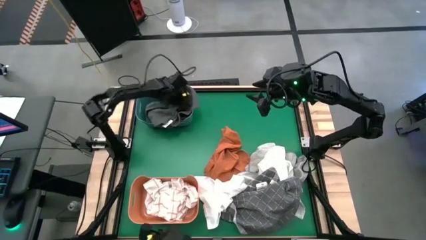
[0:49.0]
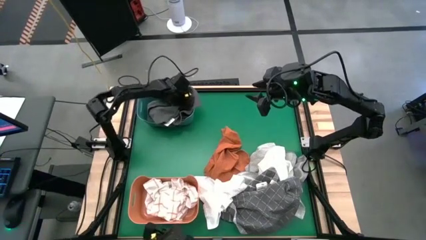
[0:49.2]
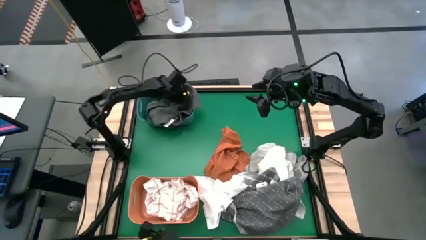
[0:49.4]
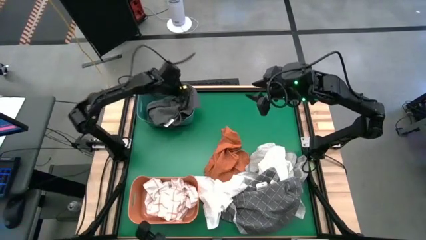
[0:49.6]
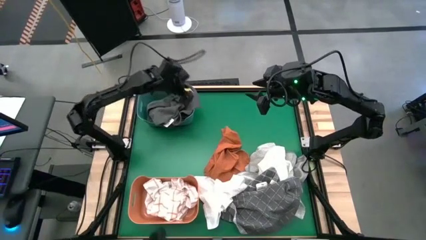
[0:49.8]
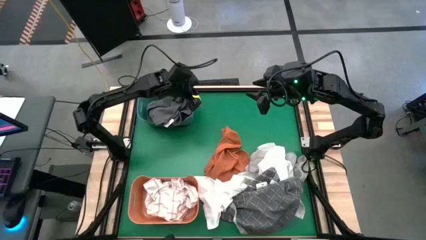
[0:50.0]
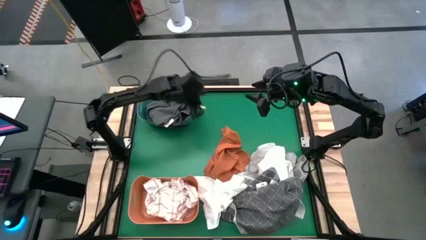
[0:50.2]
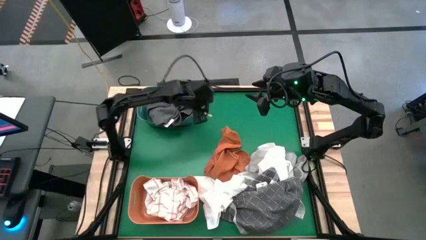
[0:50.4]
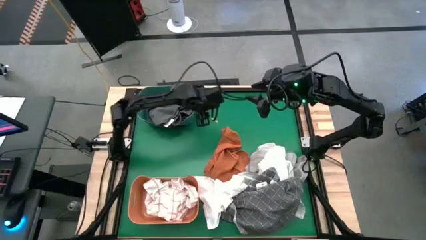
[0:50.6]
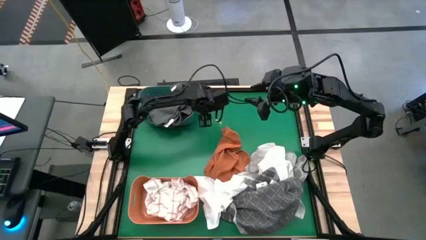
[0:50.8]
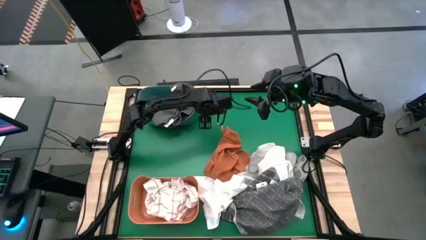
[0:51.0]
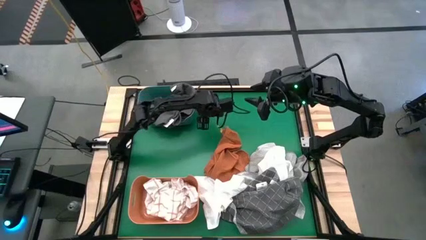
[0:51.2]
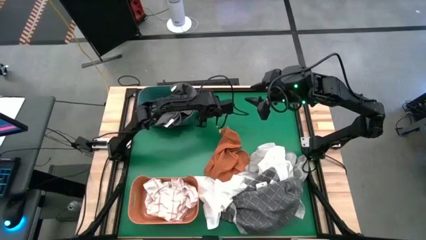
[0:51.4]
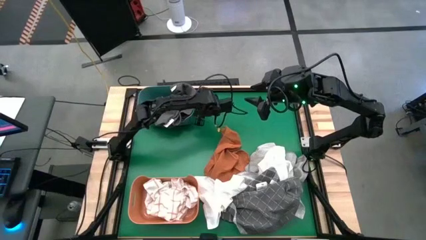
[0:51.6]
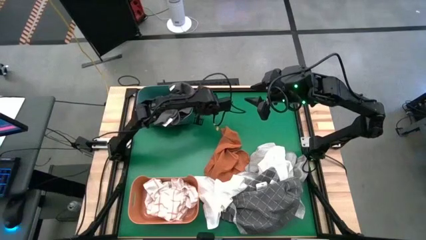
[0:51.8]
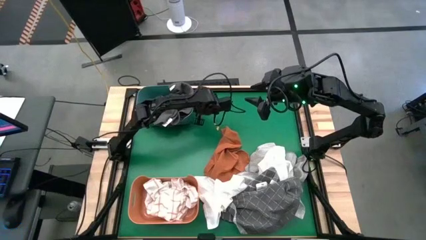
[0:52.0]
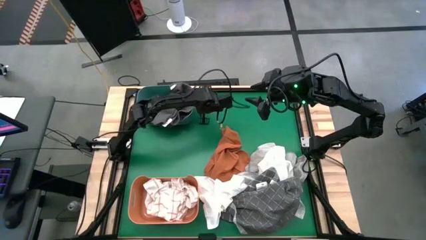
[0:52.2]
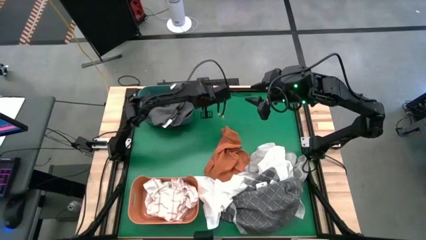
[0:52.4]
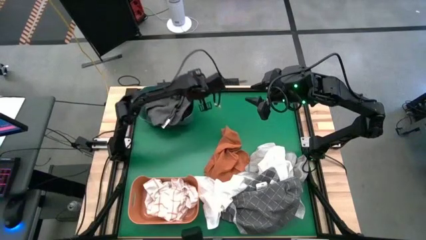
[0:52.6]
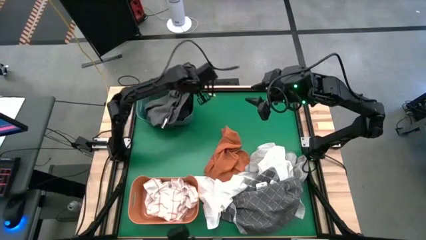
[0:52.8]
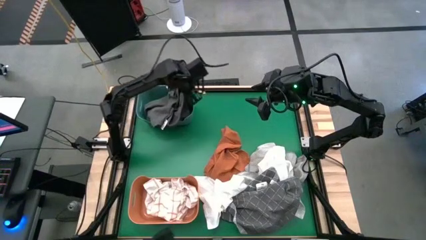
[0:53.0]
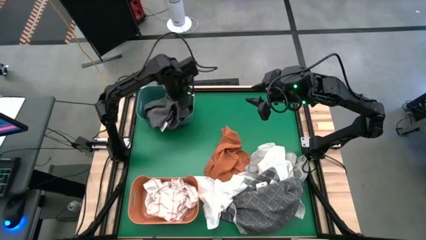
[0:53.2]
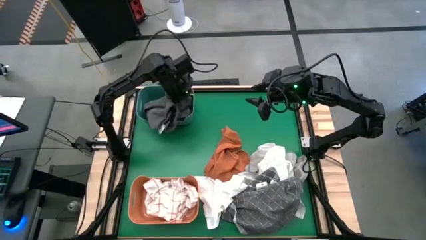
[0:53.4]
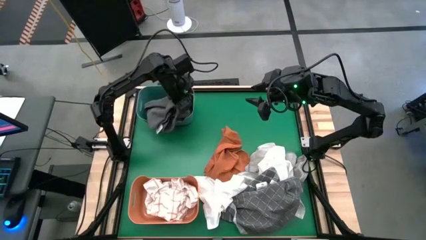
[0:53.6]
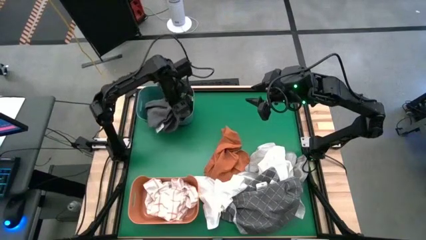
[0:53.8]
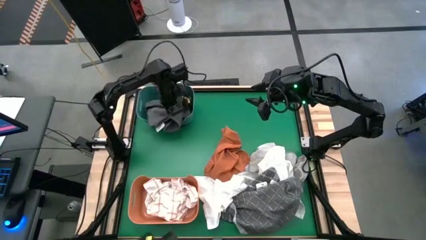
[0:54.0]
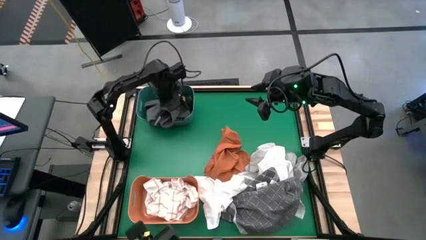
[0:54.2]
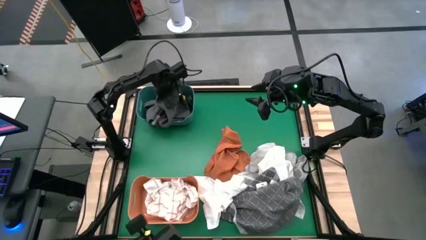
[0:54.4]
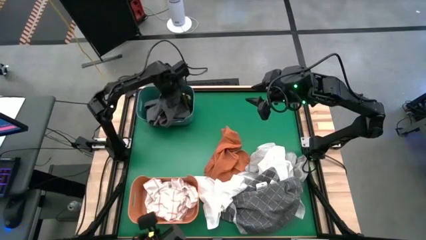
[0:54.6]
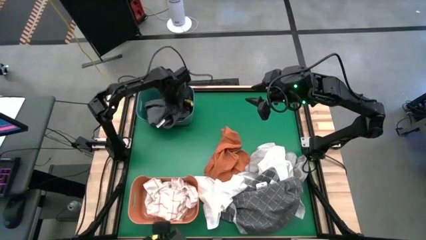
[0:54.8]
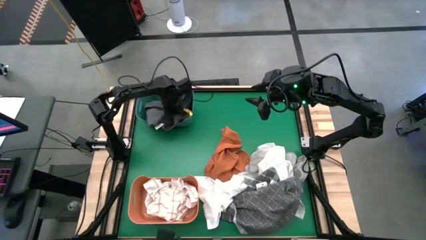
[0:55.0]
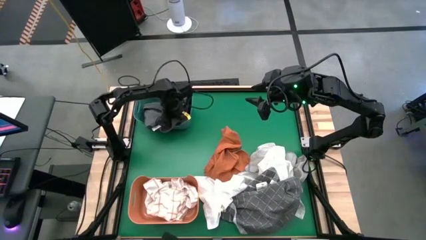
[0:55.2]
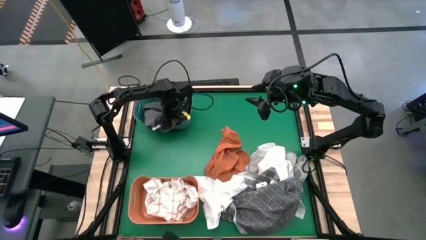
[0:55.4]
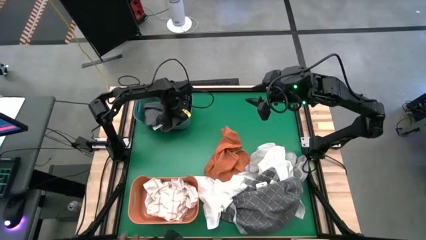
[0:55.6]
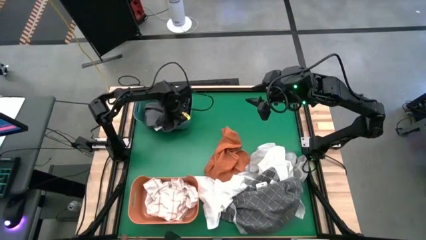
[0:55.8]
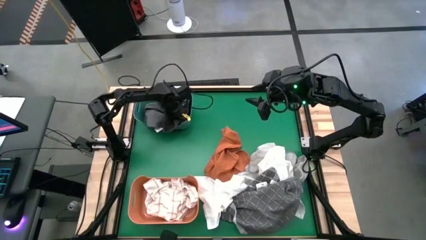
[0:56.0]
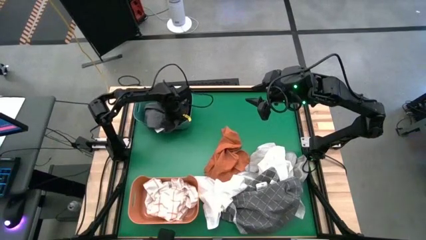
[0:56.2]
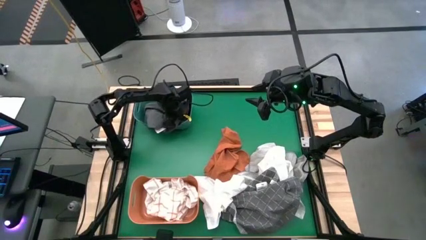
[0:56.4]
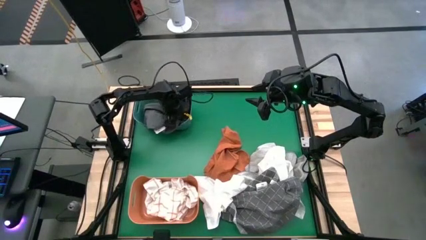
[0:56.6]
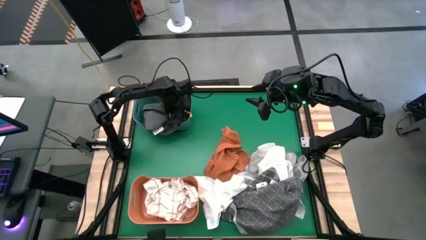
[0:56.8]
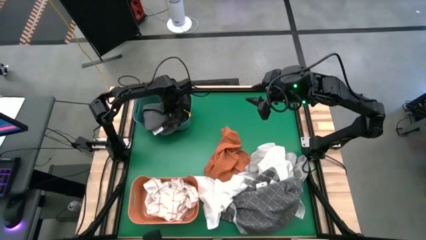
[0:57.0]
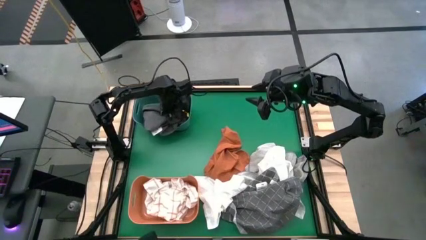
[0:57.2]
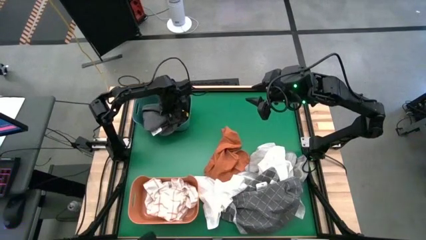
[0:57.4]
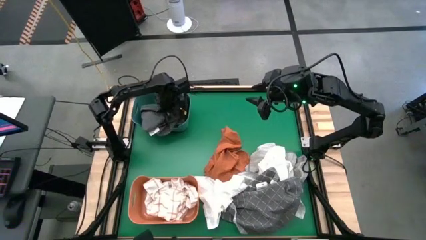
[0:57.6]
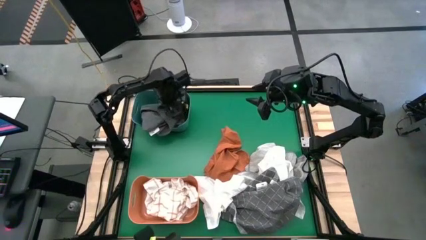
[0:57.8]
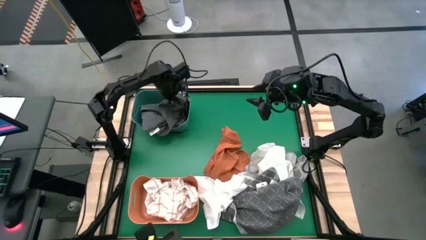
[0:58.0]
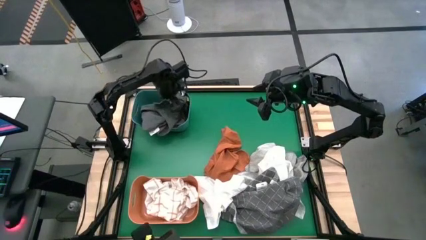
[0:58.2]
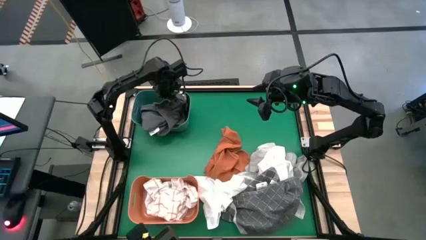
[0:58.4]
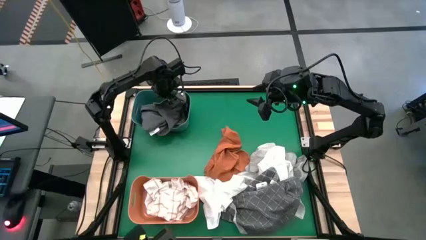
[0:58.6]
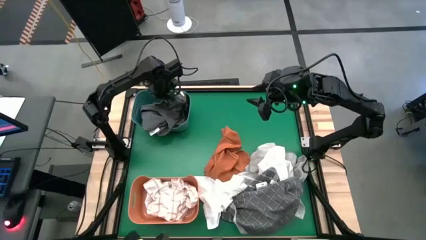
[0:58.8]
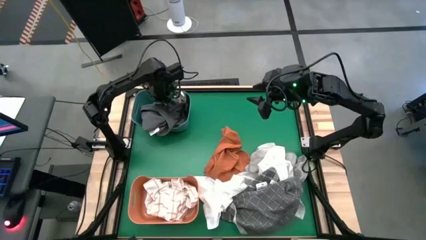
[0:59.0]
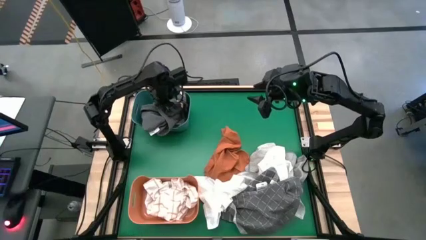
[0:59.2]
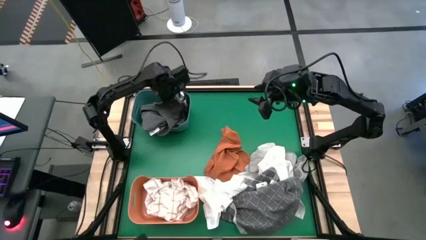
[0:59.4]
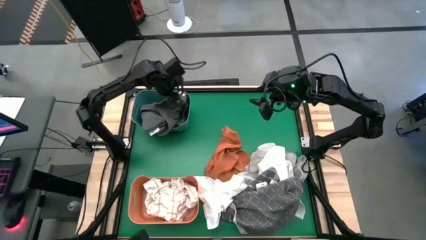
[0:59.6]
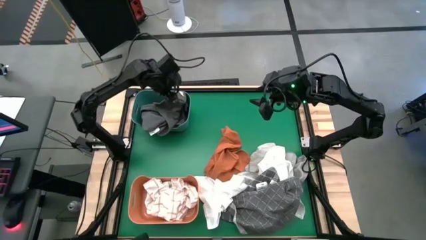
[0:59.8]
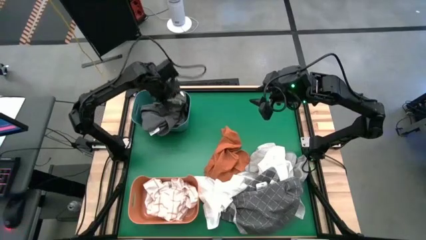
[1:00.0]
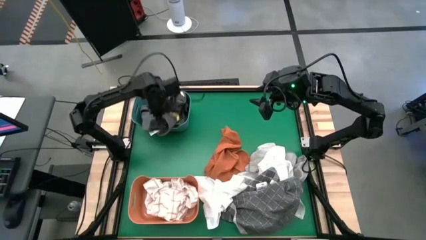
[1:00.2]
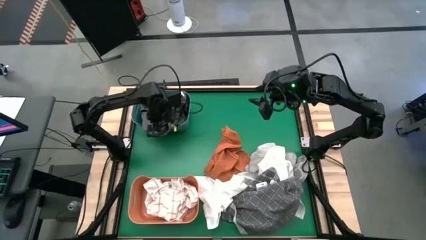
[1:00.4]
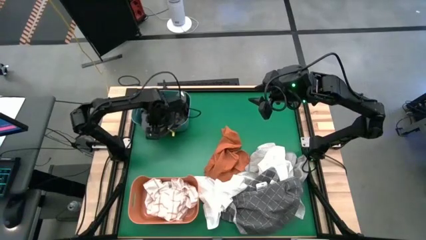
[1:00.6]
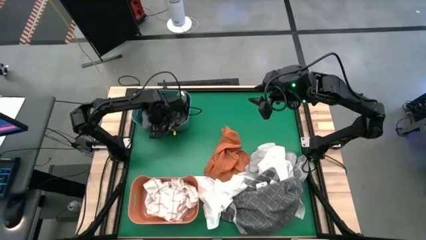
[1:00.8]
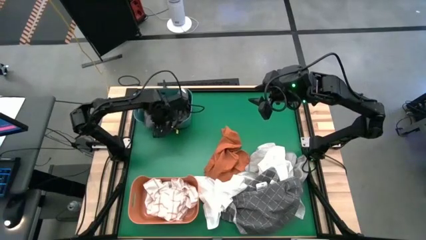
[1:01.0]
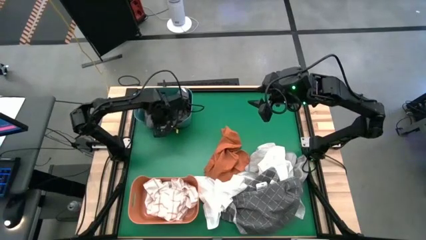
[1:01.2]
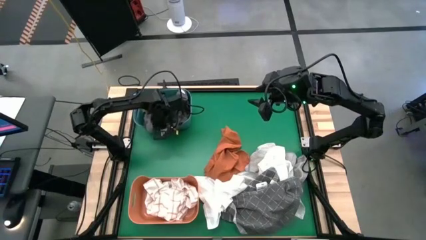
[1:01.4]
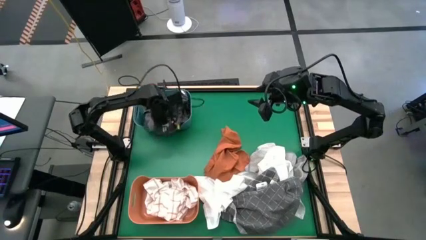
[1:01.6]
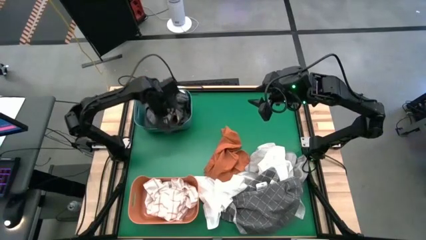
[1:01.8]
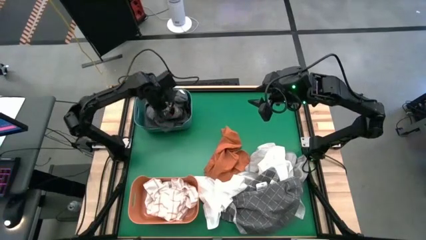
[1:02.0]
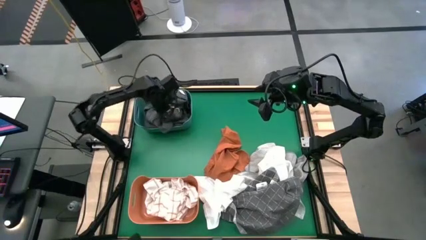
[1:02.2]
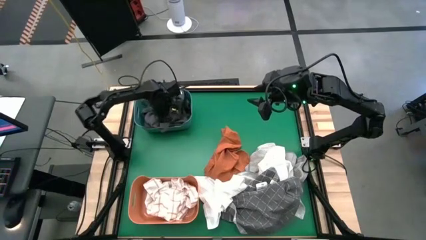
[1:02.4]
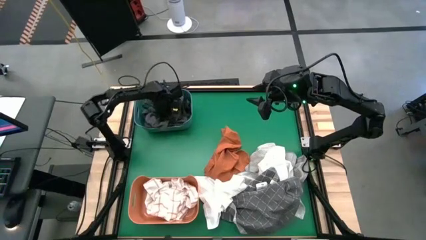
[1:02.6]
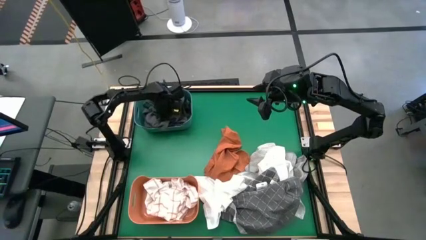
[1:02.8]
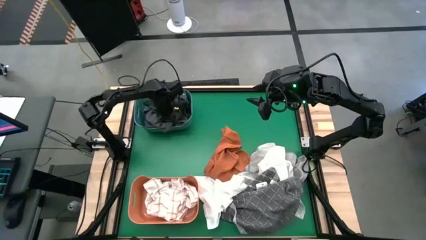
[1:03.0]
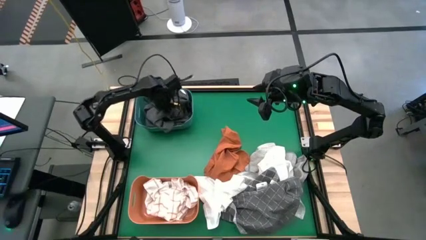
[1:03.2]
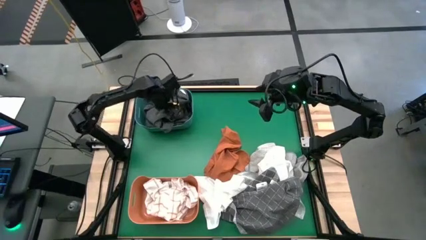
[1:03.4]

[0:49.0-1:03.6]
Task: Sort microfiber towel by color & place in baskets
Put the black microfiber towel into the green bin
